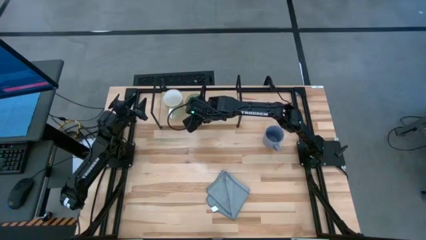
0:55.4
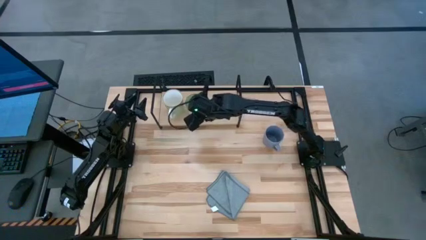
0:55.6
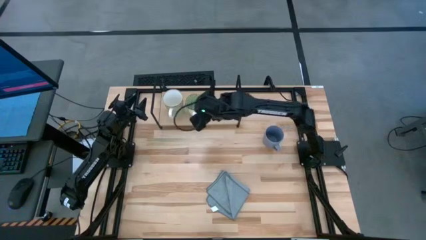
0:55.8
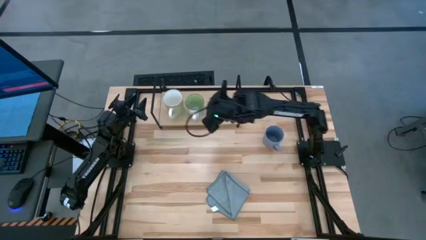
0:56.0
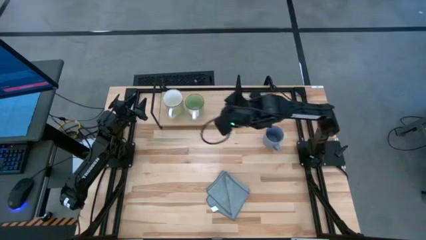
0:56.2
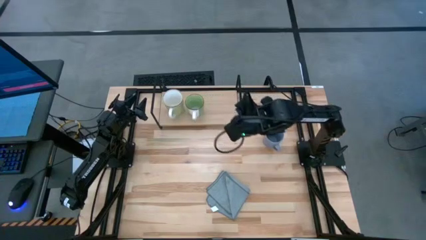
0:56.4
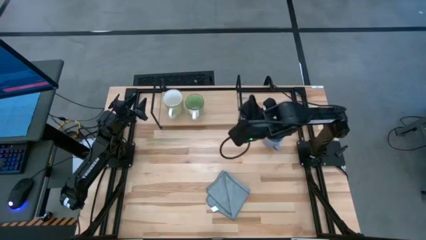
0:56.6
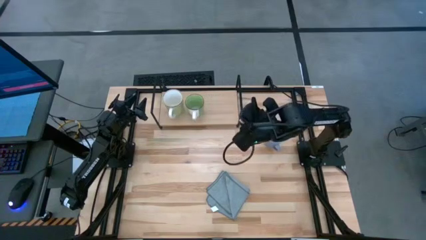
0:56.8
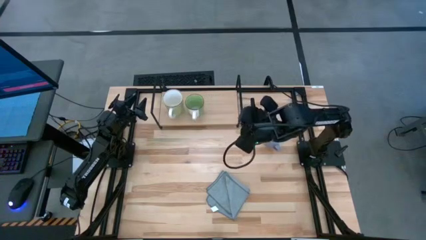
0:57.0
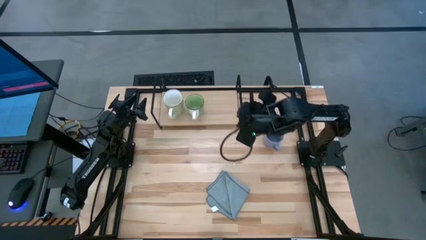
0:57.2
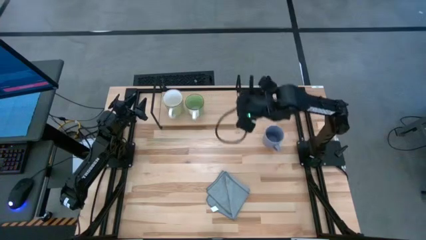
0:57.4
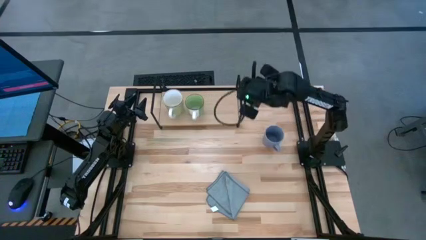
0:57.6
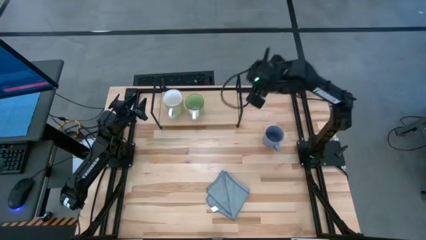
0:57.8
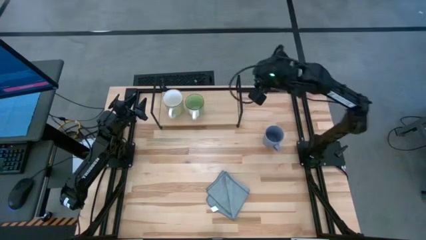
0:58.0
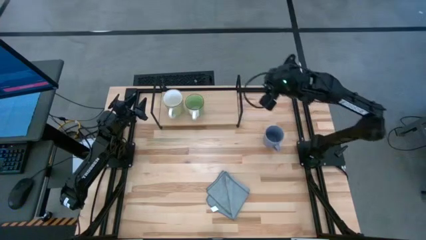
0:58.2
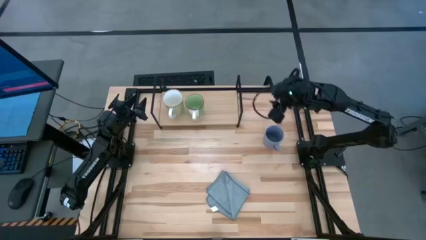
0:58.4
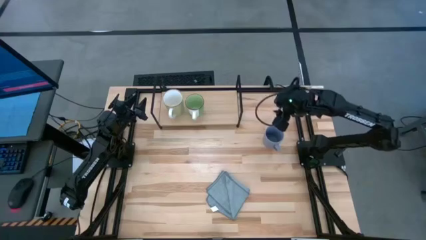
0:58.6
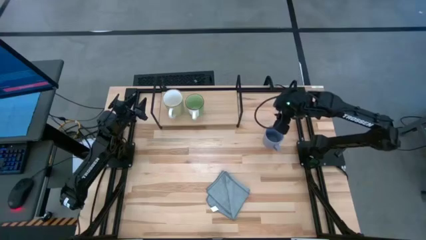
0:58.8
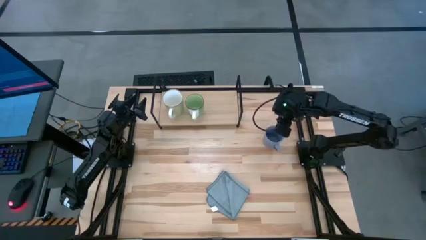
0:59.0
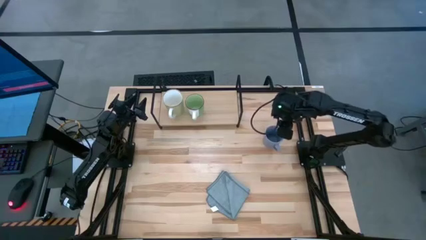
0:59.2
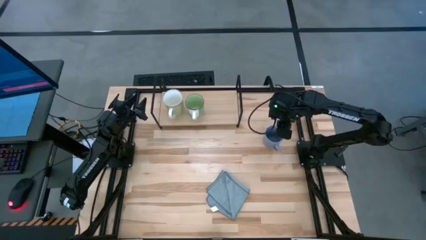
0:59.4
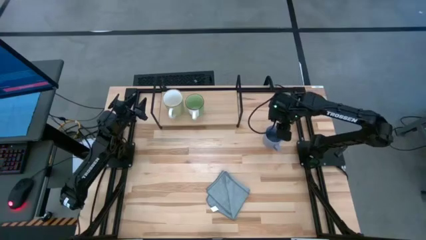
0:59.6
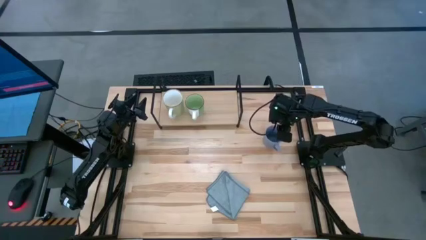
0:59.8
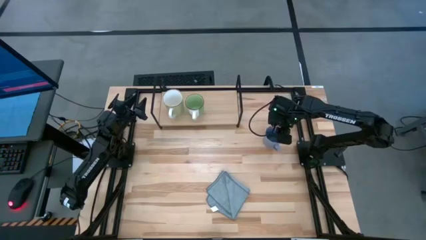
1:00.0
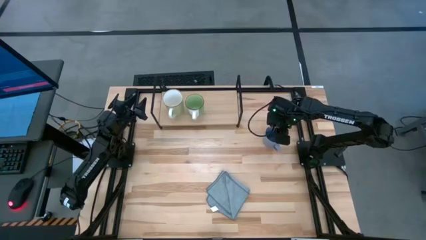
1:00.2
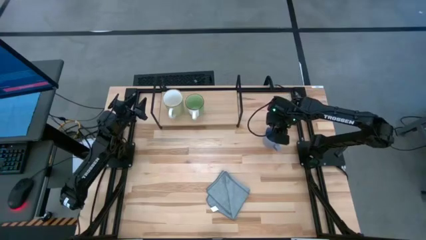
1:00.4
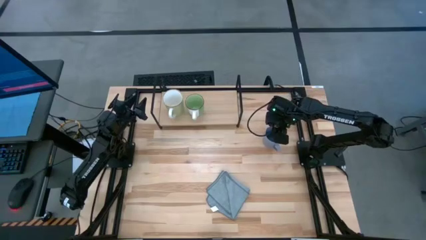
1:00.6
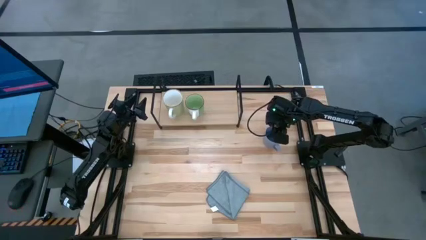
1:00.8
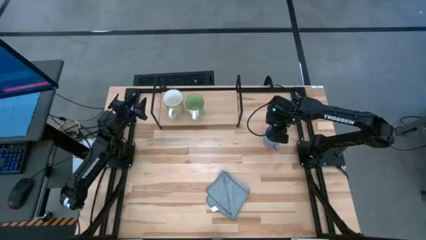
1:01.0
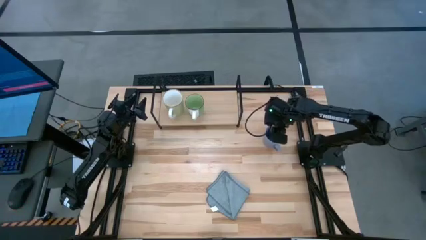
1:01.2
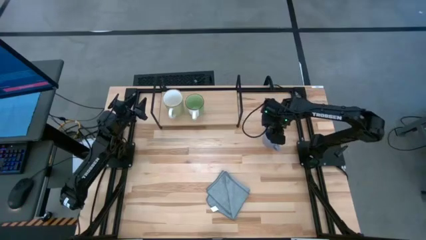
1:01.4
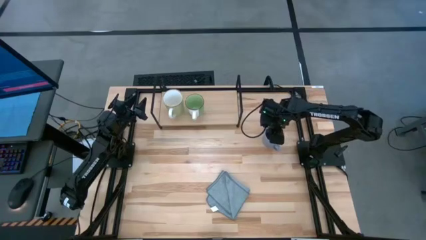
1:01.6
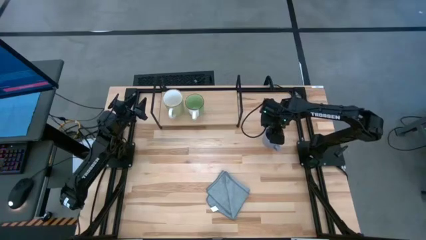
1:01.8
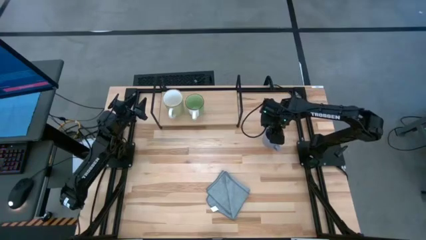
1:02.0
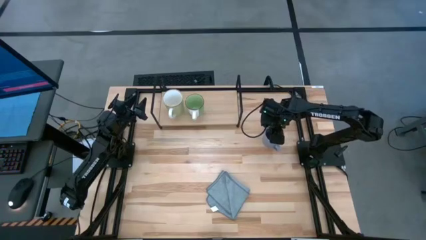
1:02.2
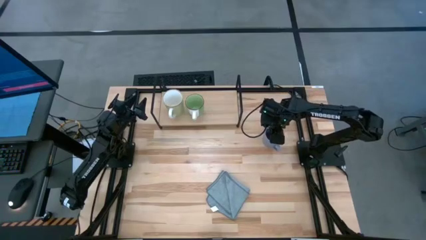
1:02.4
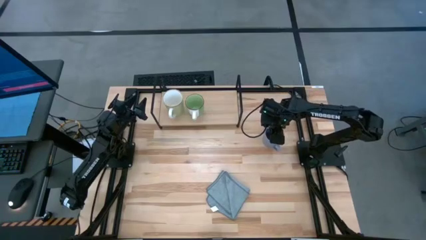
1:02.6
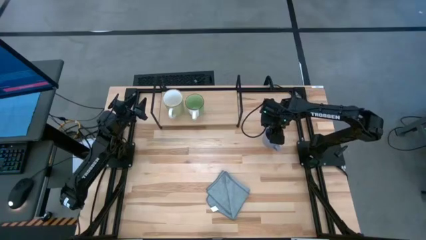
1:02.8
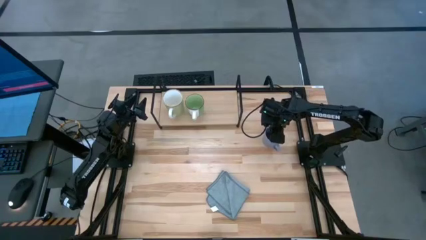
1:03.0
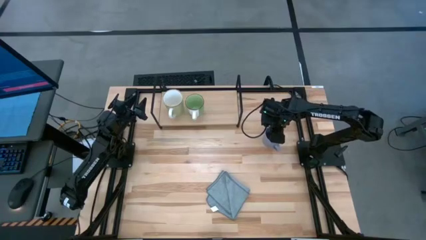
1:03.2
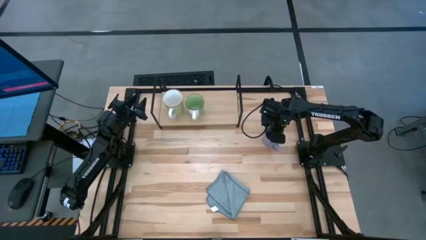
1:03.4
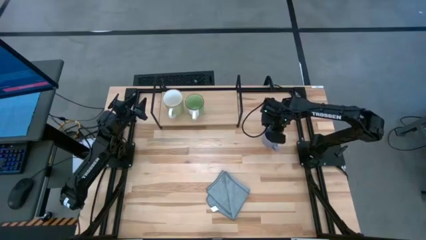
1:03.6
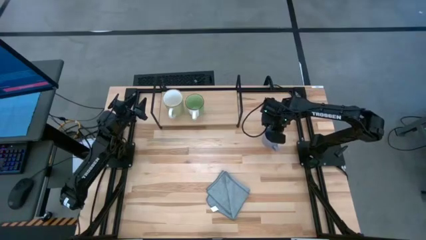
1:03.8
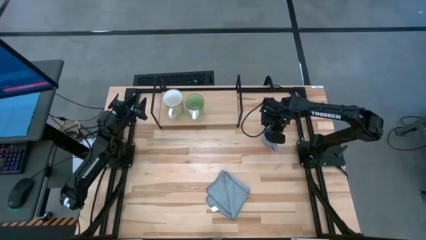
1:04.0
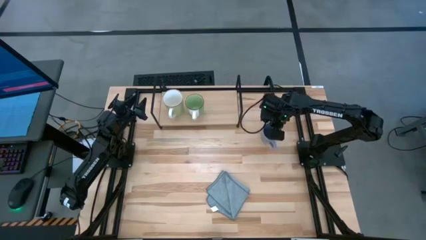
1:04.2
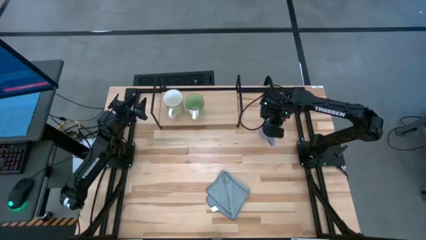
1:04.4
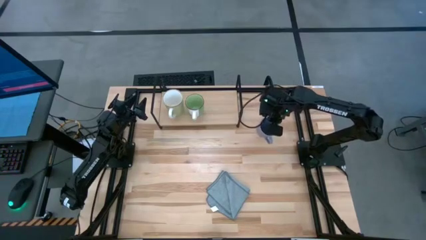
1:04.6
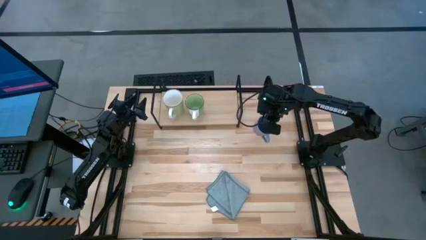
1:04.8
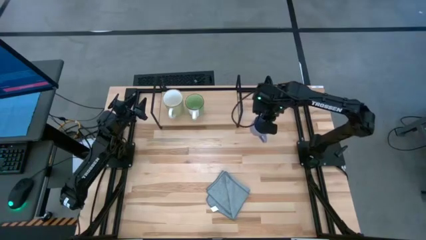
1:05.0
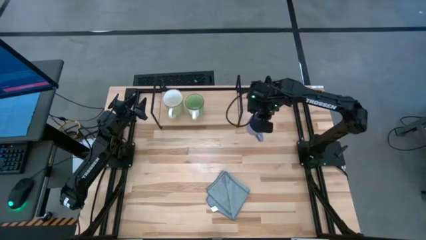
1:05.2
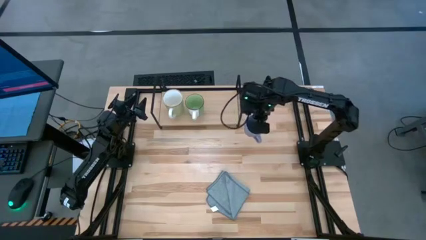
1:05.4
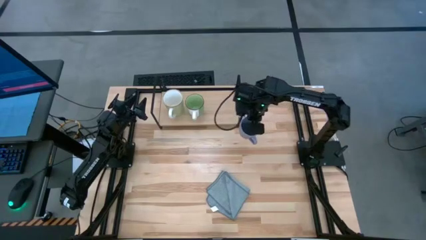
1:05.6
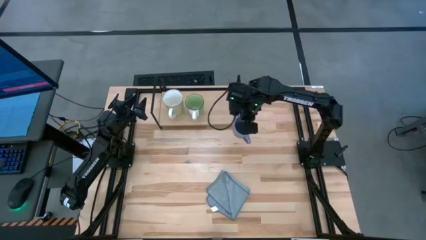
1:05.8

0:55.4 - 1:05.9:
Task: Stack small to large cups/mugs on shelf
Put the blue mug on the shelf

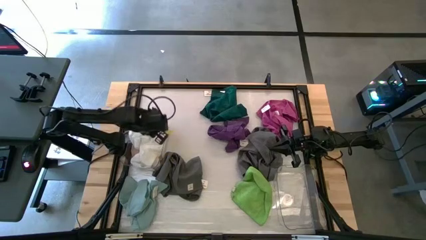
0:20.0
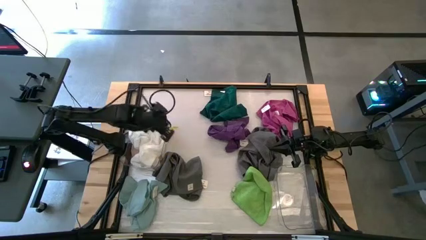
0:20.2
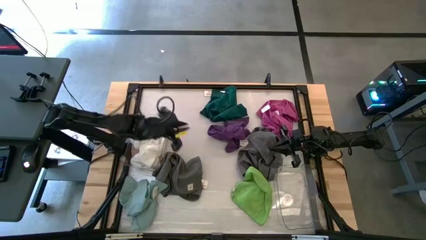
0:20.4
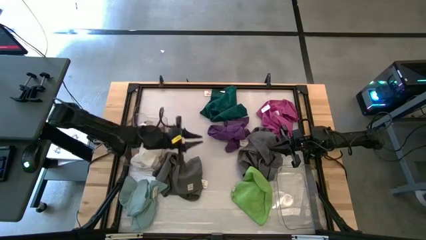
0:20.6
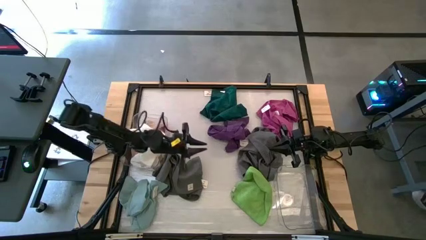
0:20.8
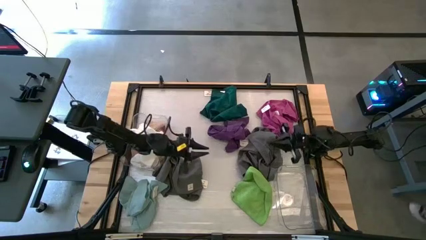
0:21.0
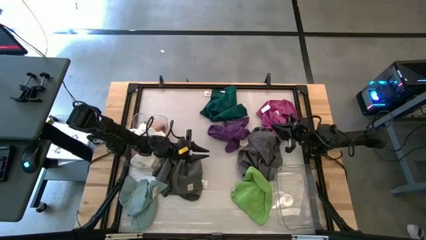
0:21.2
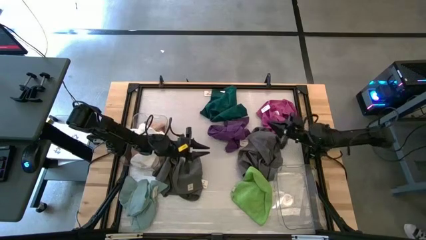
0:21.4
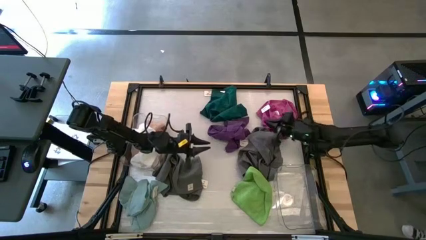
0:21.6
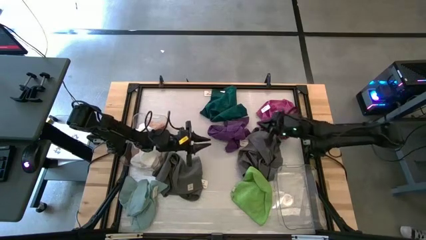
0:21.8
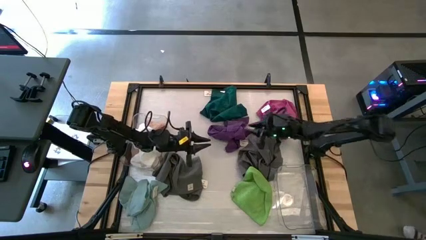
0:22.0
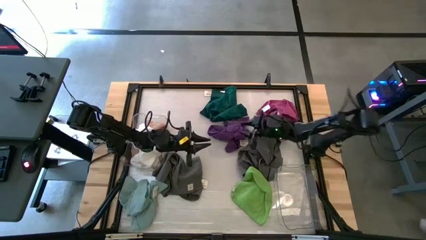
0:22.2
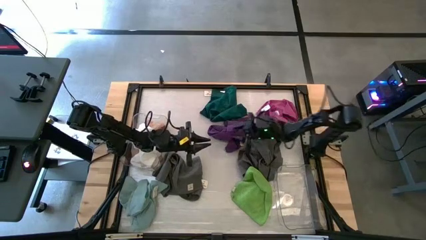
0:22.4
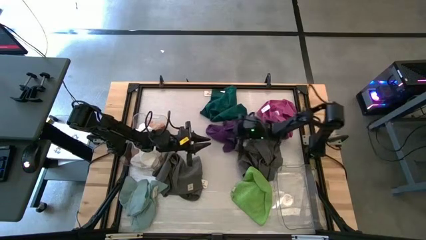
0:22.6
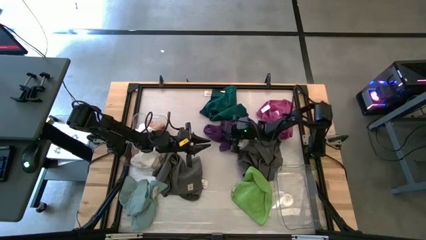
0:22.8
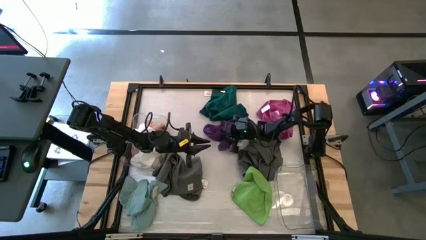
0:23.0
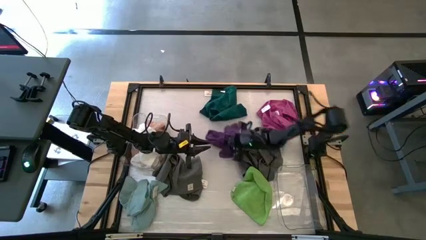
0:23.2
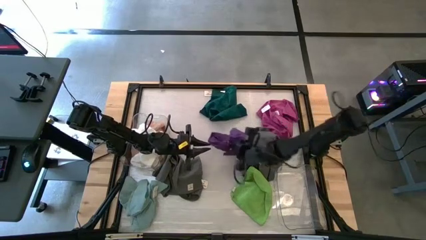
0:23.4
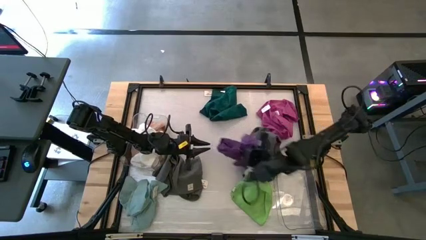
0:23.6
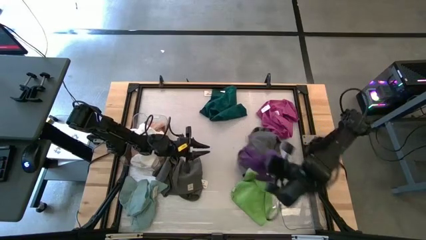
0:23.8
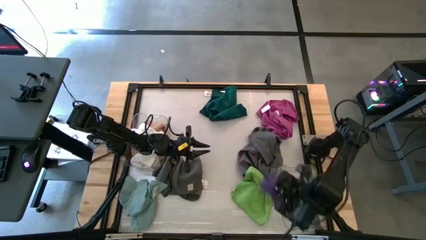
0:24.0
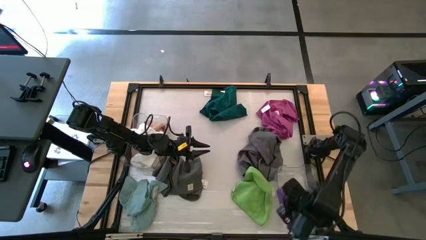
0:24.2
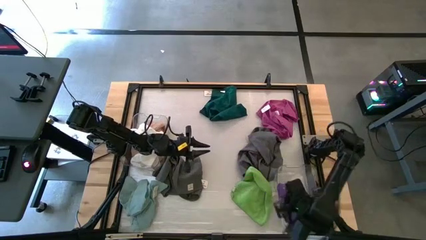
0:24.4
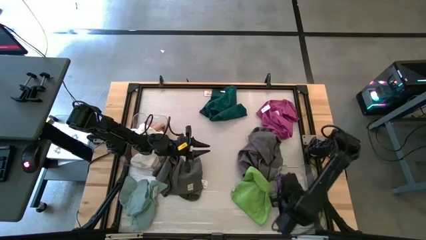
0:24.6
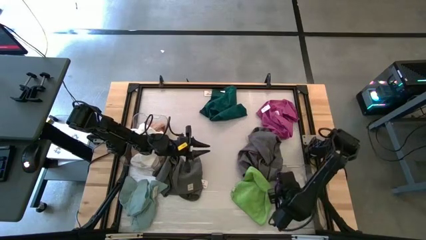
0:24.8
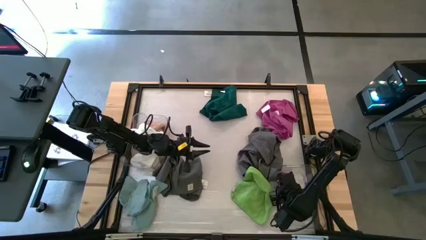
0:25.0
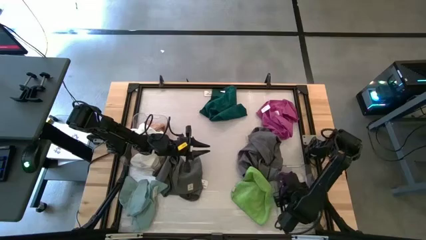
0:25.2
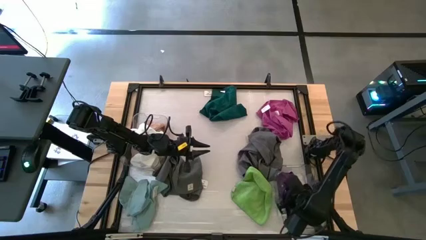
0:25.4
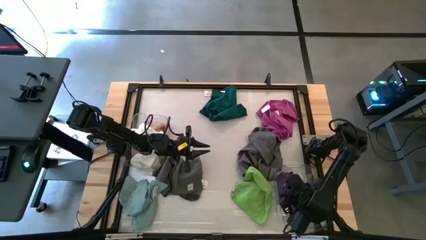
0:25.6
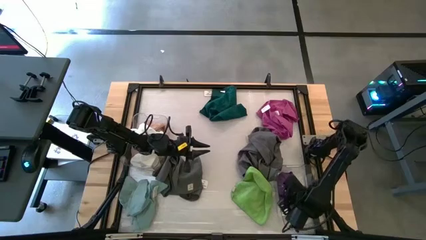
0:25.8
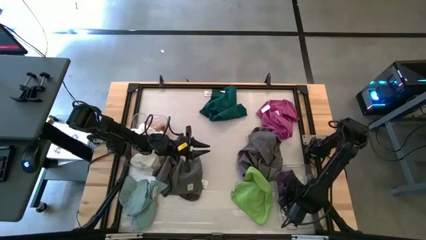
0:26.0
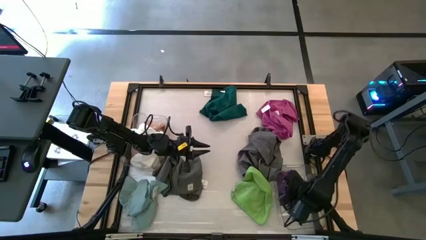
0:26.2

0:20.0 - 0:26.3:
Task: Sort towels by color in basket
Put the purple towel into the right transparent bin
